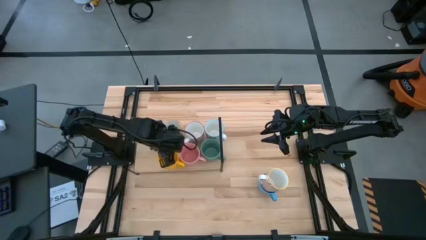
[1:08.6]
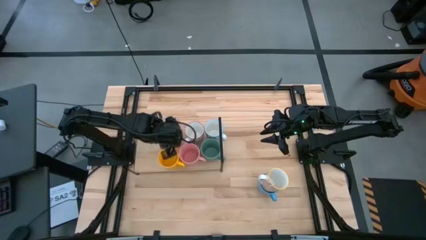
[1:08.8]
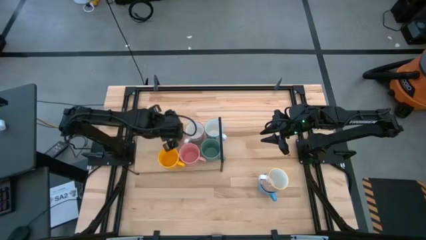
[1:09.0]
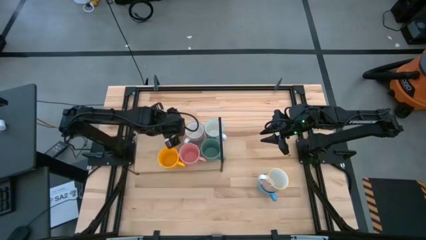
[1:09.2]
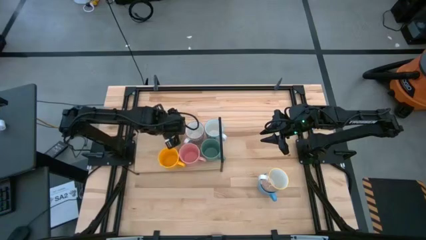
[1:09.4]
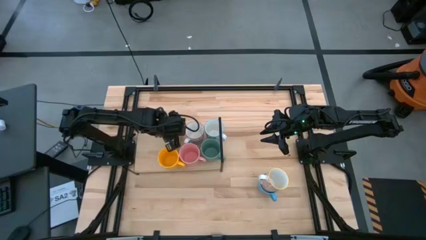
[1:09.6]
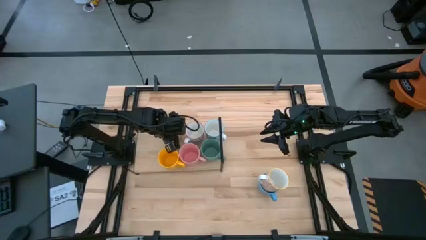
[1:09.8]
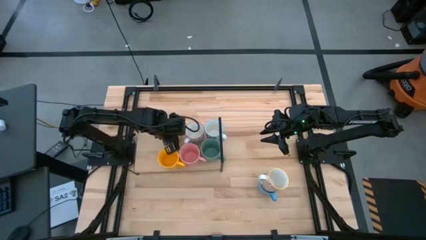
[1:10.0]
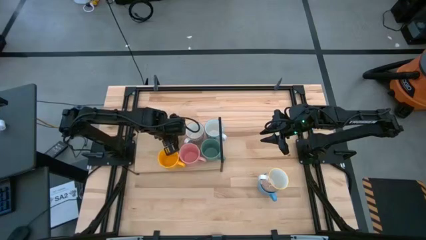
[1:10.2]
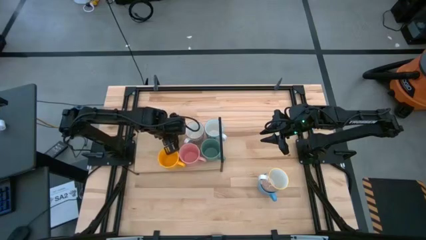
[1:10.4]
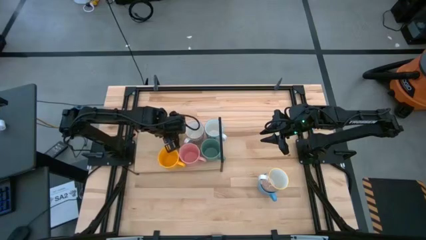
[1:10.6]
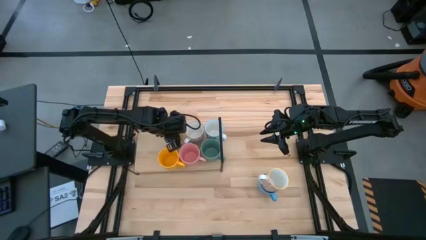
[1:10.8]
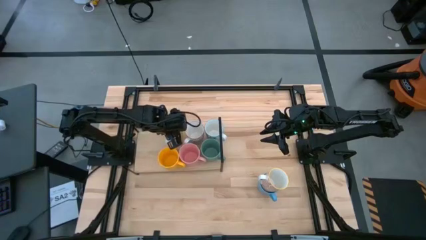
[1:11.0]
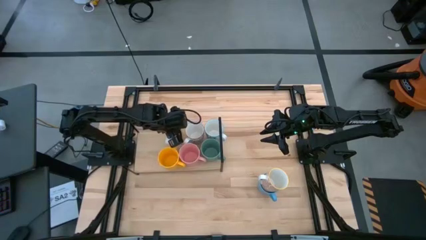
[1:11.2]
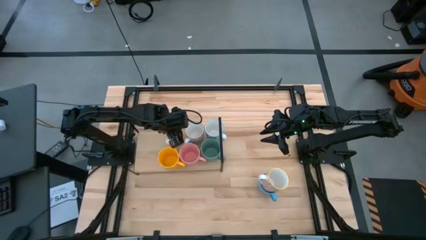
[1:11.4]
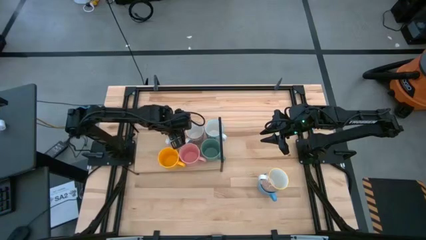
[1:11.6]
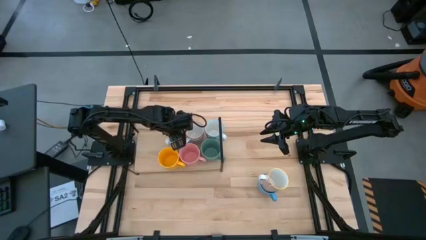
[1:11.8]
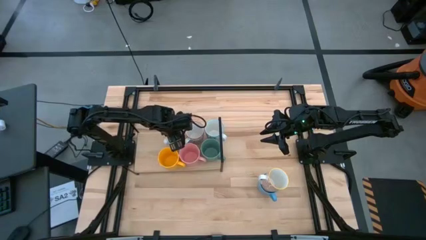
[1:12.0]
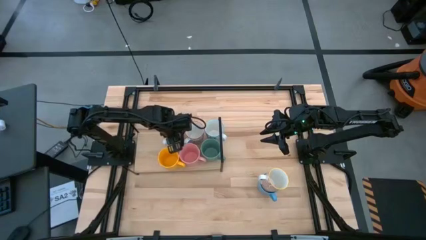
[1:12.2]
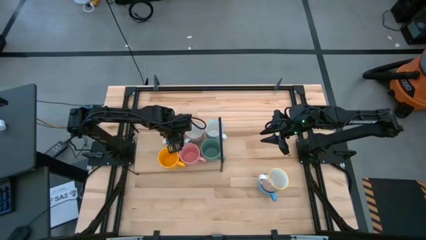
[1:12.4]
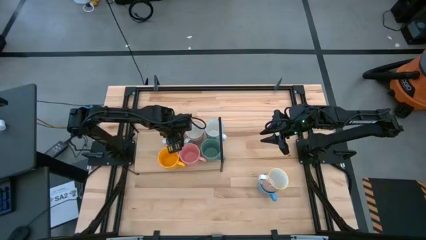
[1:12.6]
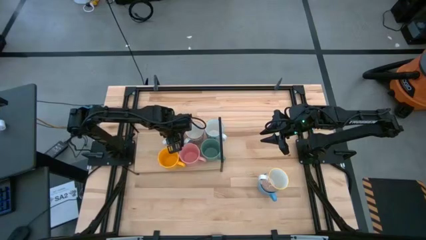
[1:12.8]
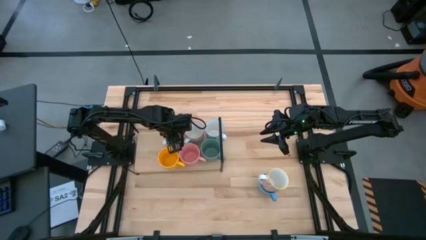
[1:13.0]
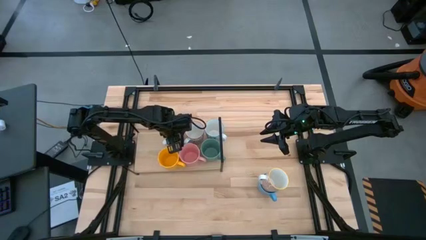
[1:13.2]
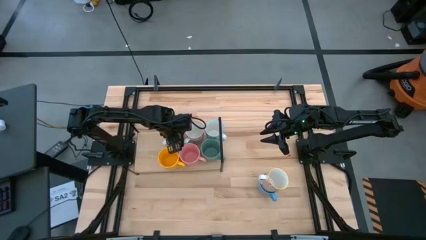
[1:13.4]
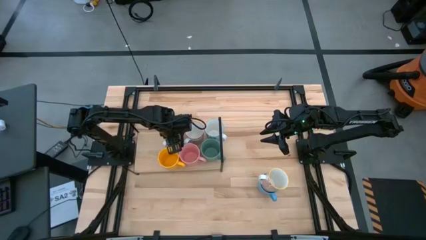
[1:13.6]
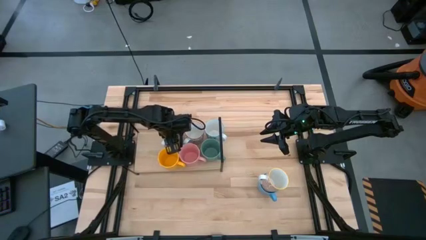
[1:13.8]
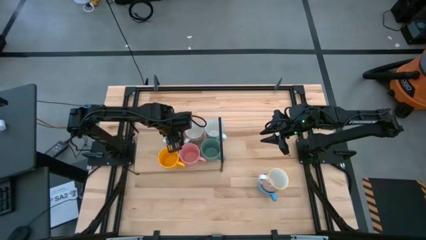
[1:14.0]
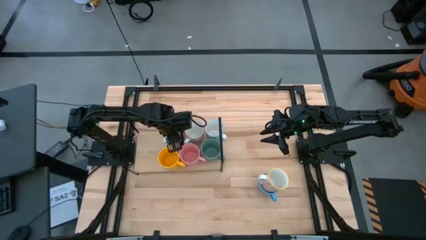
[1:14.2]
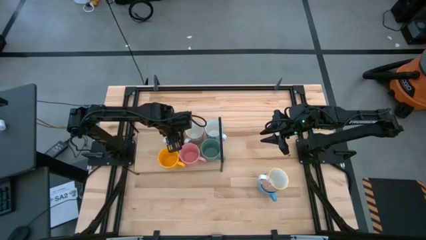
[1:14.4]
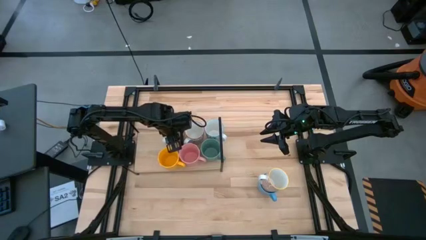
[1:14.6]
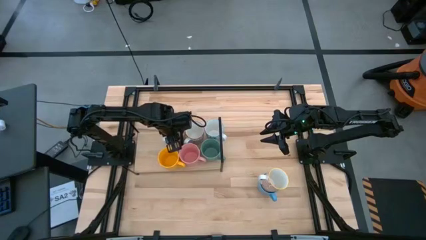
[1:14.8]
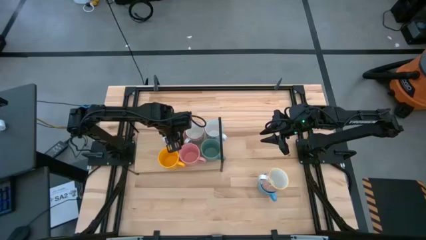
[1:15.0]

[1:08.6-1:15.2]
Task: Place coffee mugs
Adjust the yellow patterned mug

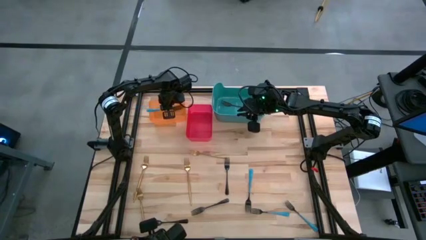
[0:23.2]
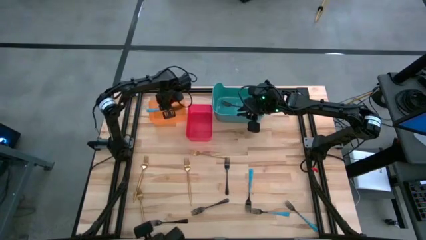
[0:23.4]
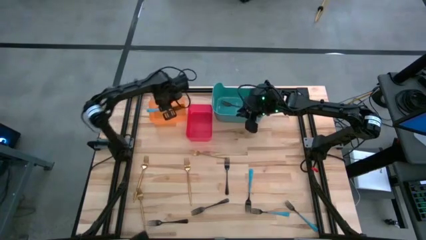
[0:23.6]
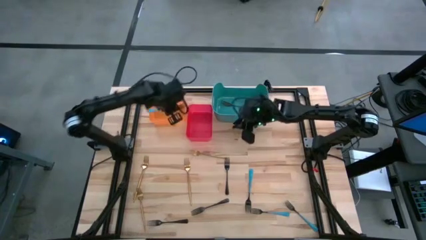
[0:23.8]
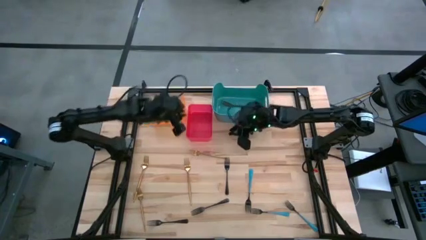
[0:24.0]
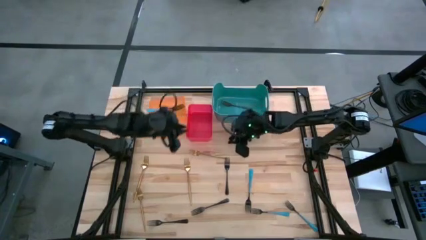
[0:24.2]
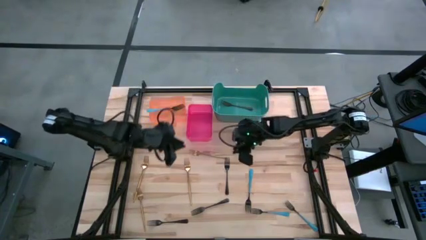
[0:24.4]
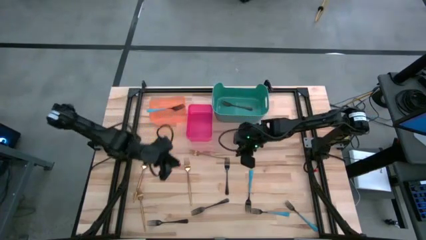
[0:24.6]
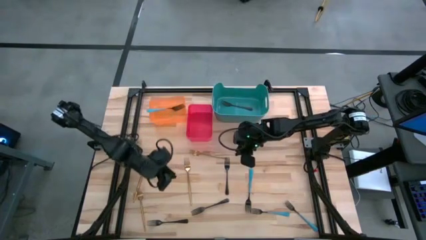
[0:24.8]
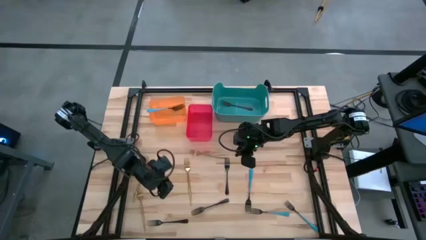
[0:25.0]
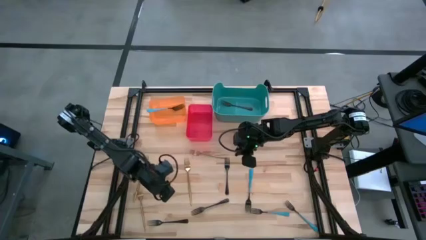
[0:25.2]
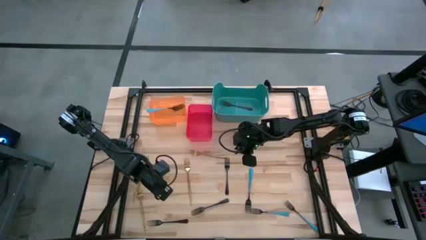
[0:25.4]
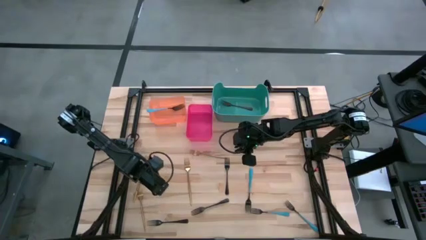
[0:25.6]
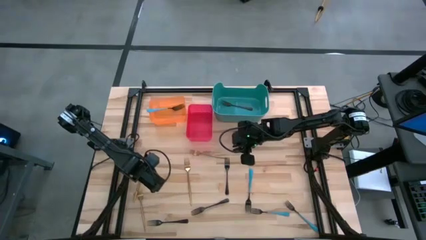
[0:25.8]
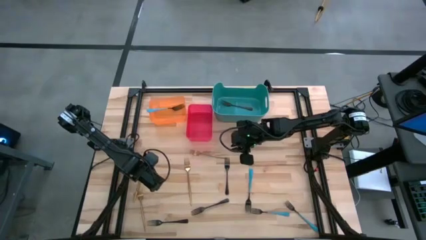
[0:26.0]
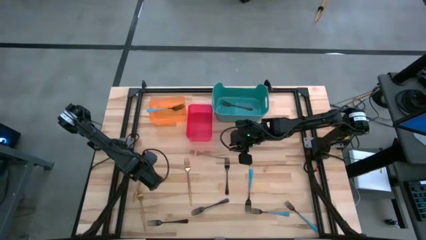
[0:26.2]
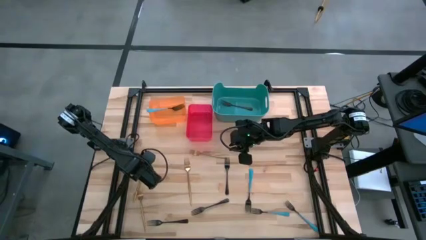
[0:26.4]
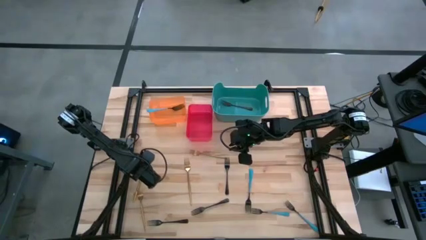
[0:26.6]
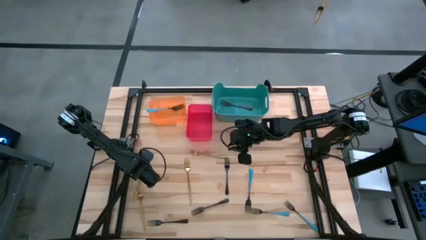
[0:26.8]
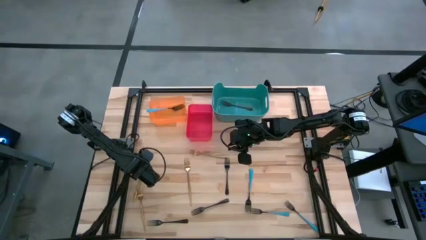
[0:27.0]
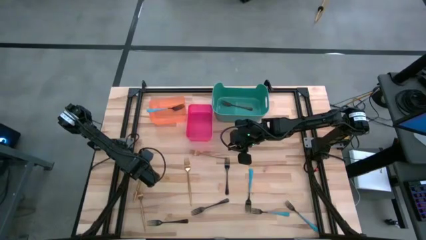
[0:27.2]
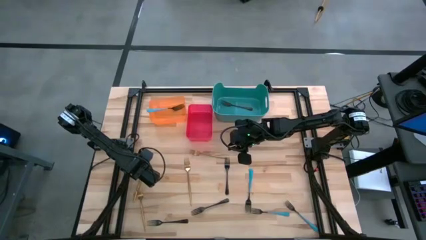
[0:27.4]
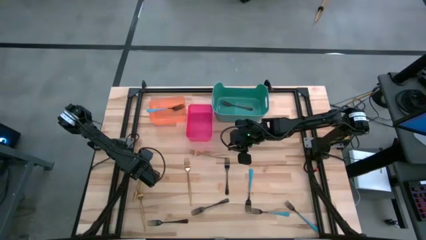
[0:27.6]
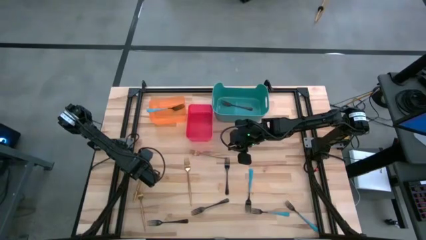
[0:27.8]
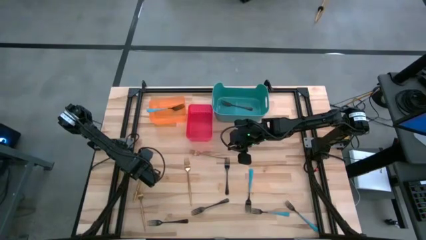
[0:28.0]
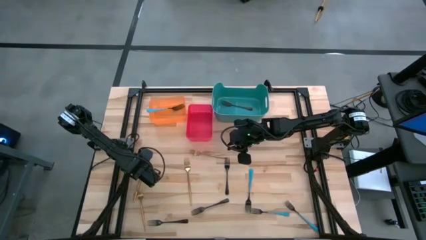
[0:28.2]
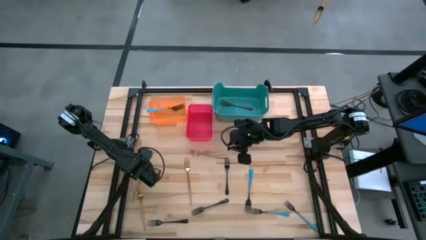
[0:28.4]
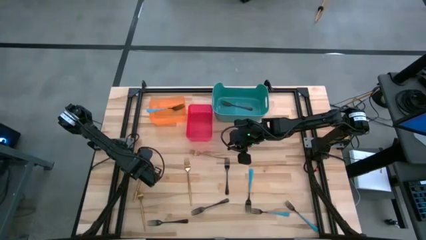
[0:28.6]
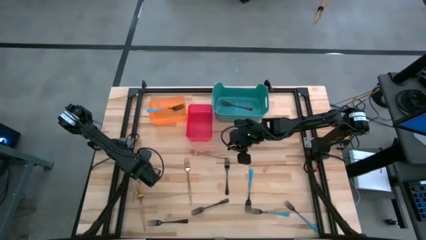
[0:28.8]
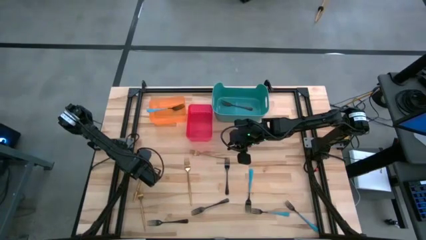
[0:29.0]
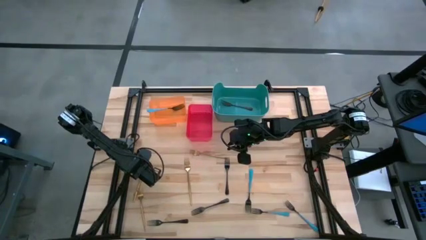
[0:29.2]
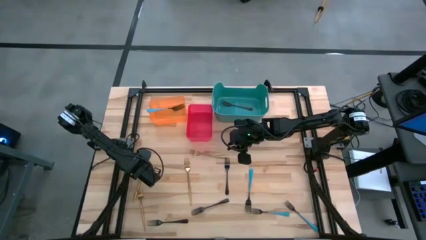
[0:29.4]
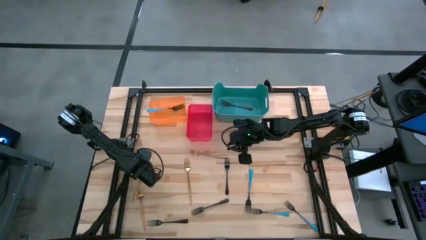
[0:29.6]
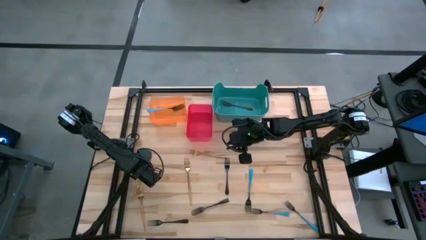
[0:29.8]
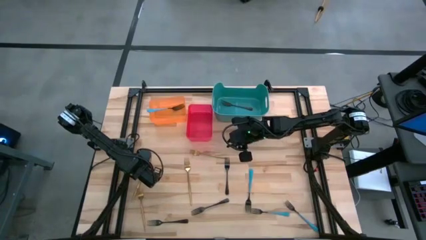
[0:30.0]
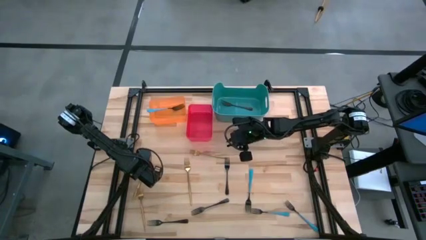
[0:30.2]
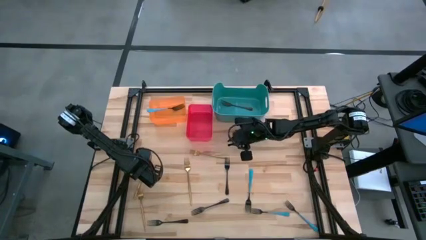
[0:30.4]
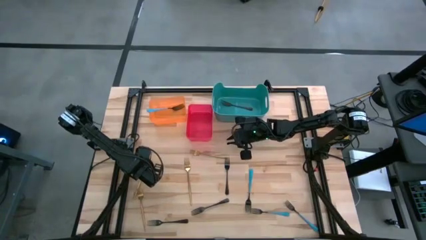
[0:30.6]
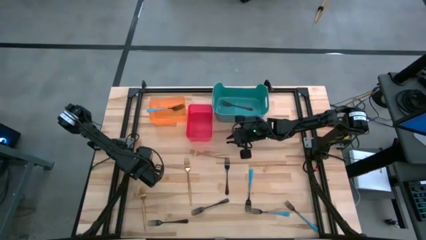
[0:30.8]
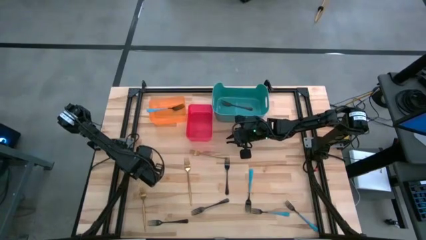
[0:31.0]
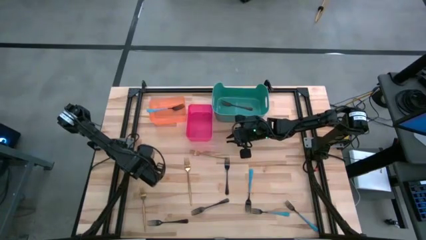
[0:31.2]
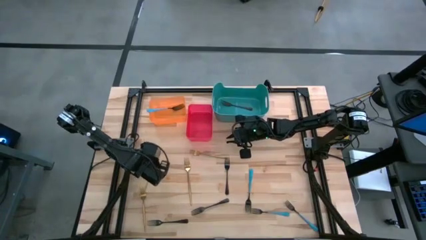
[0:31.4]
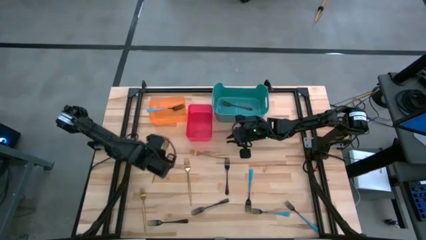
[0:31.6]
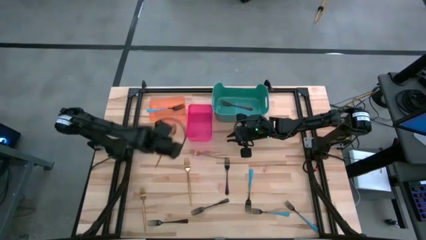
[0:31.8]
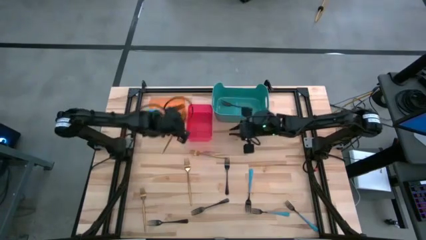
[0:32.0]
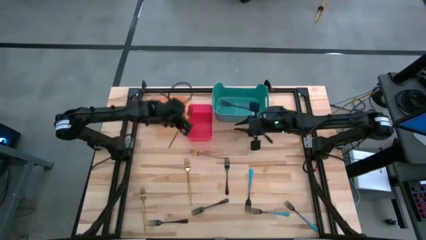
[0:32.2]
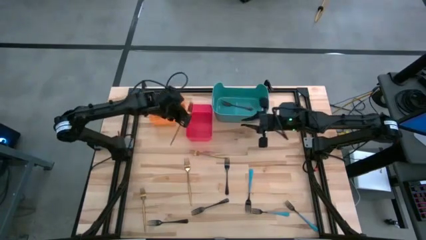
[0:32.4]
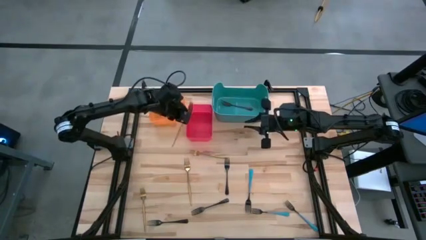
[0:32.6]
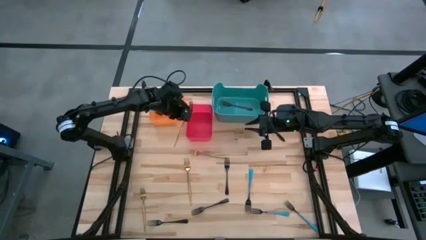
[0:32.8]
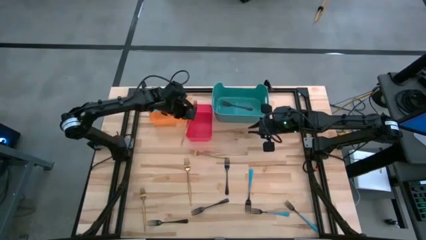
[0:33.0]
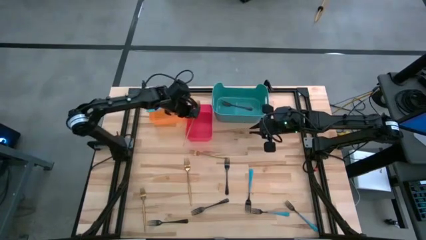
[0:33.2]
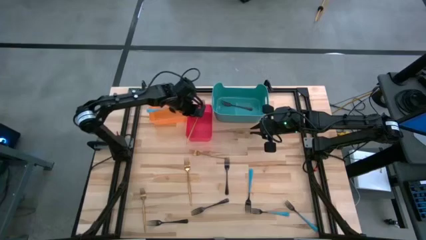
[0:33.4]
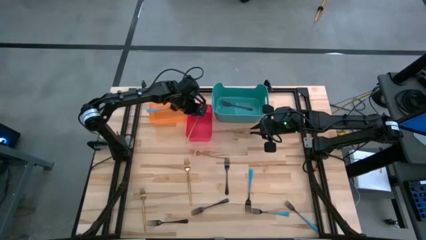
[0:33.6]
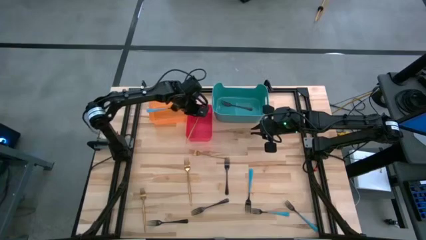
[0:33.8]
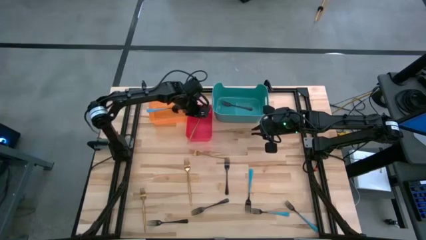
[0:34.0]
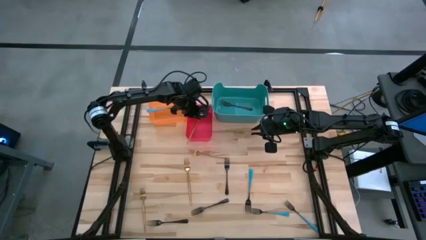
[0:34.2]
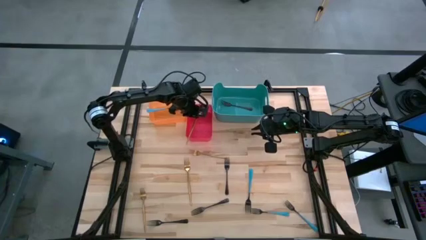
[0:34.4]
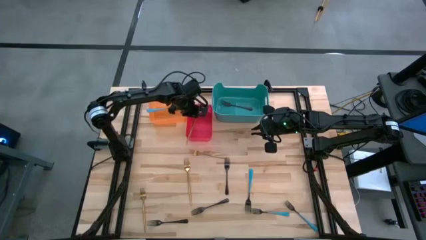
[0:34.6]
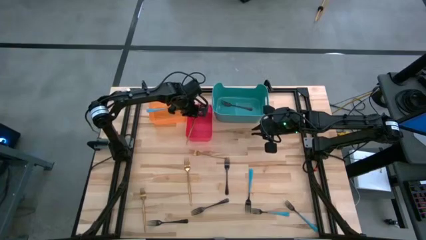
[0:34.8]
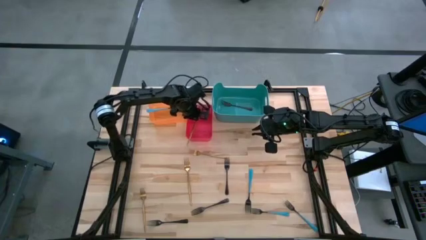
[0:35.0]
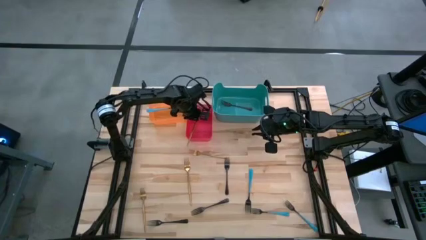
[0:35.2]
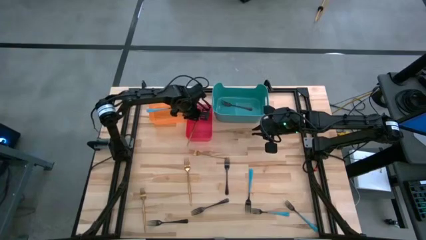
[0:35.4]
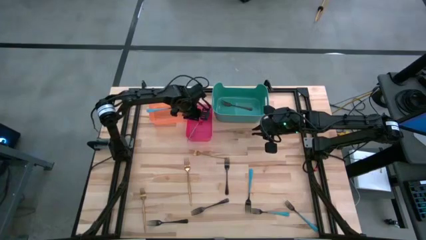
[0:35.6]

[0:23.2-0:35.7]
Task: Sort silverware by color (type)
Put the gold fork into the red bin
